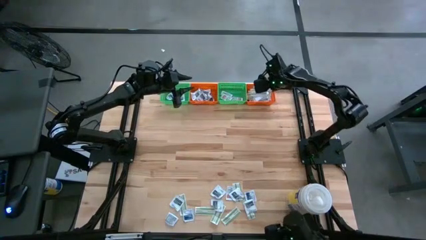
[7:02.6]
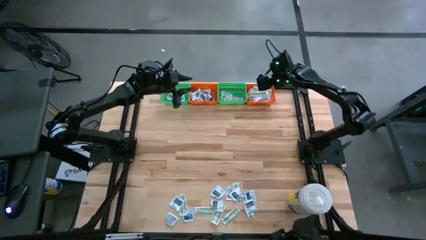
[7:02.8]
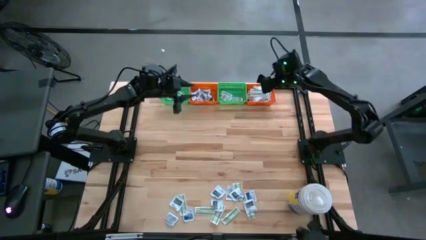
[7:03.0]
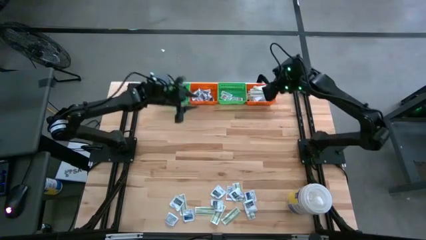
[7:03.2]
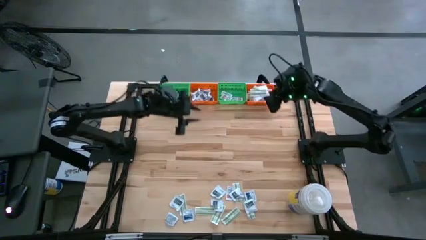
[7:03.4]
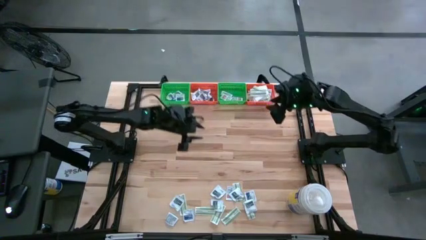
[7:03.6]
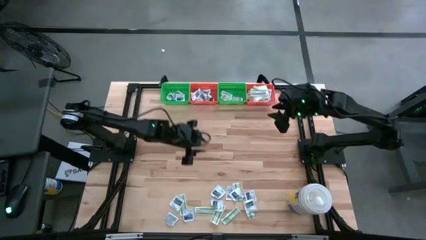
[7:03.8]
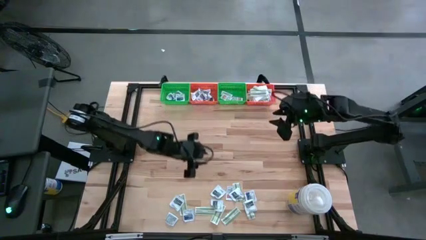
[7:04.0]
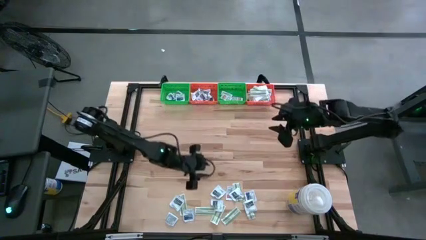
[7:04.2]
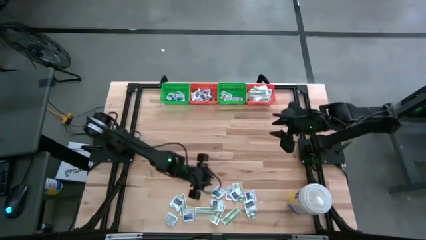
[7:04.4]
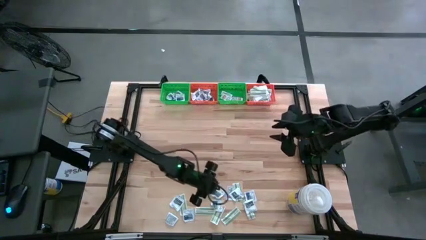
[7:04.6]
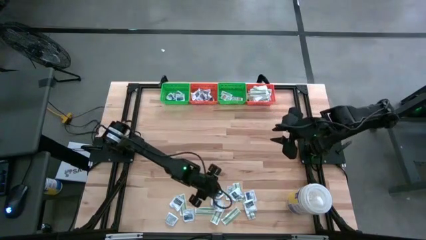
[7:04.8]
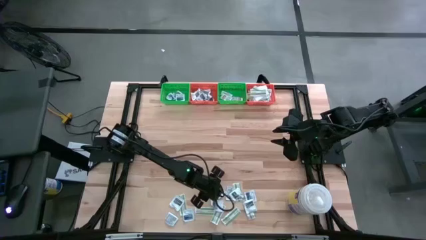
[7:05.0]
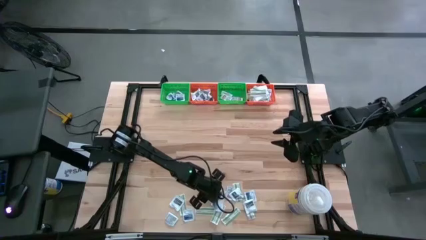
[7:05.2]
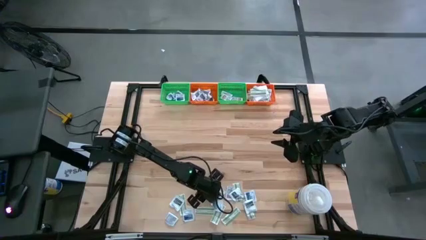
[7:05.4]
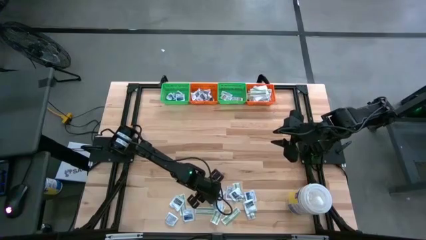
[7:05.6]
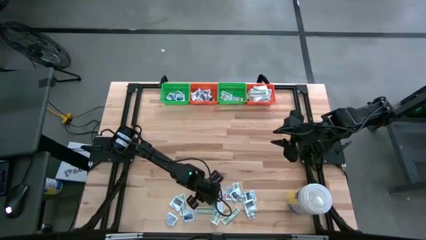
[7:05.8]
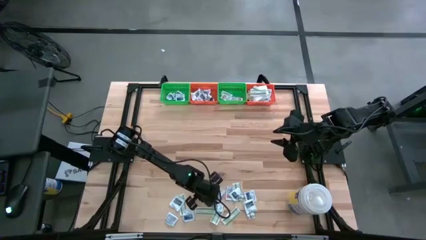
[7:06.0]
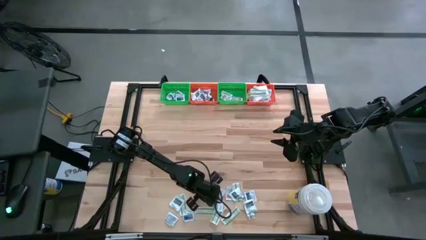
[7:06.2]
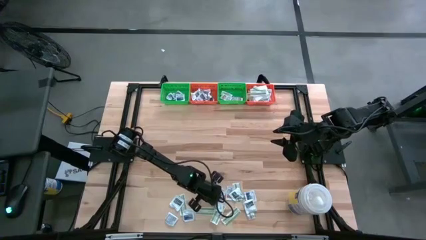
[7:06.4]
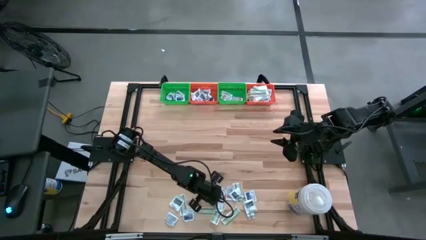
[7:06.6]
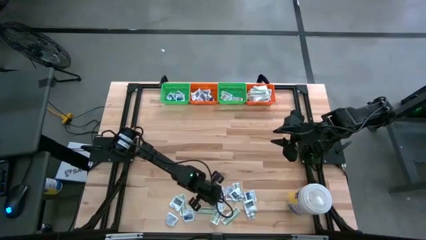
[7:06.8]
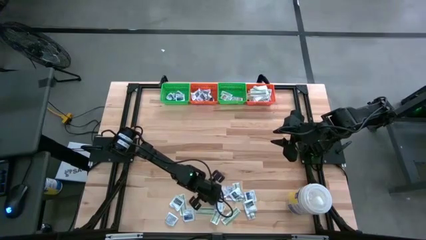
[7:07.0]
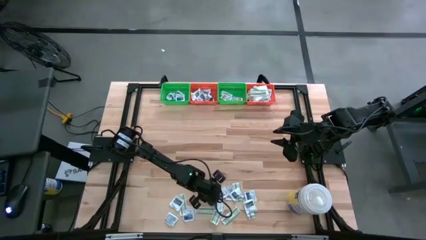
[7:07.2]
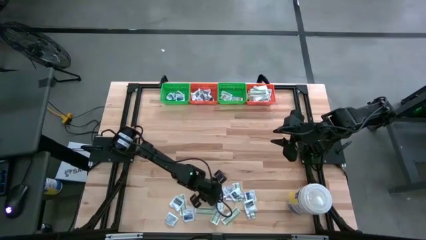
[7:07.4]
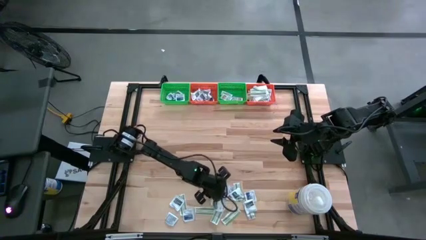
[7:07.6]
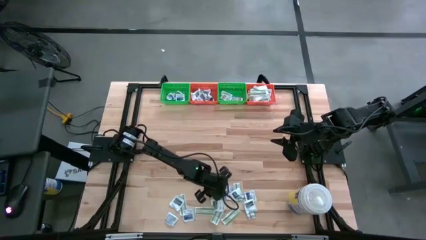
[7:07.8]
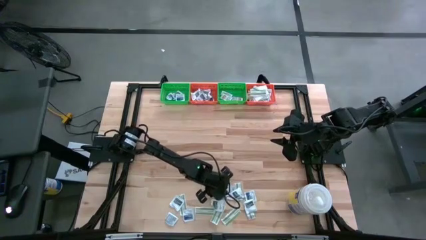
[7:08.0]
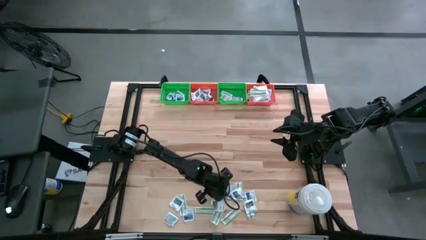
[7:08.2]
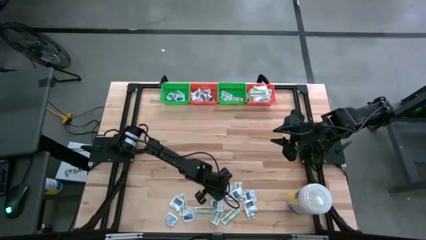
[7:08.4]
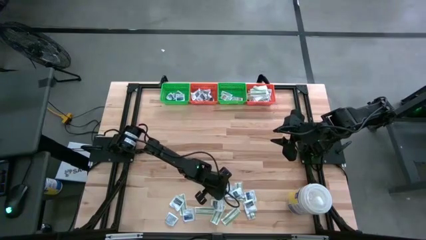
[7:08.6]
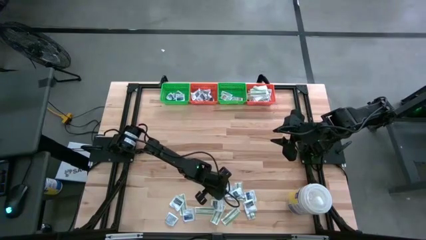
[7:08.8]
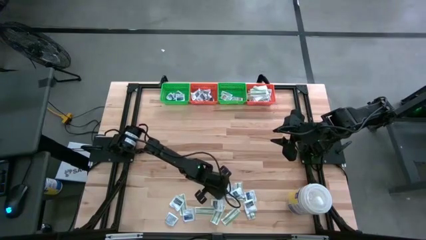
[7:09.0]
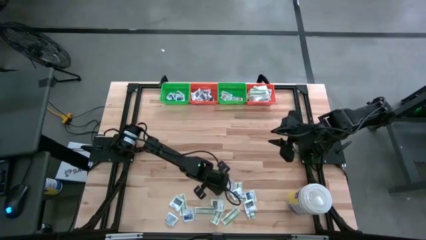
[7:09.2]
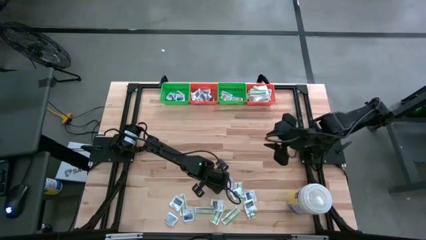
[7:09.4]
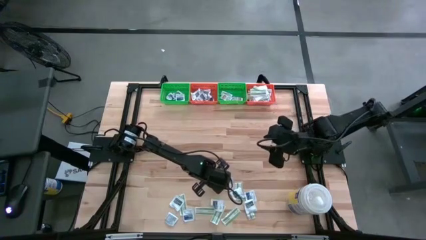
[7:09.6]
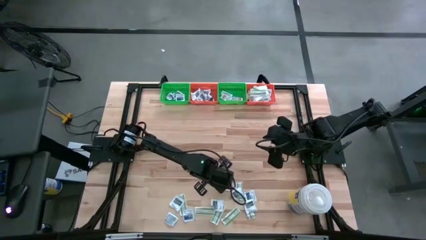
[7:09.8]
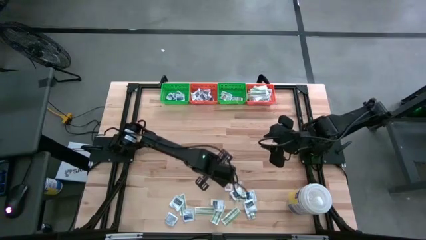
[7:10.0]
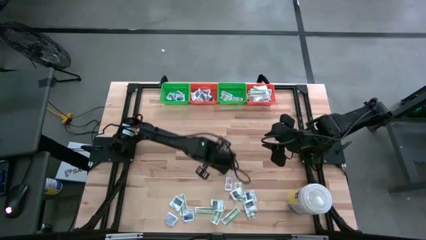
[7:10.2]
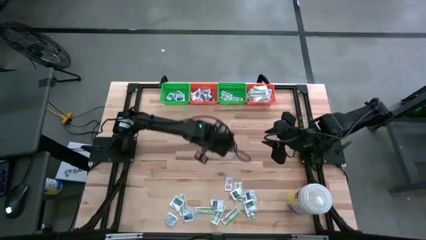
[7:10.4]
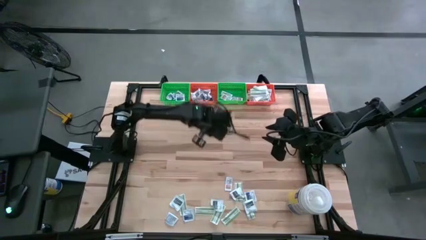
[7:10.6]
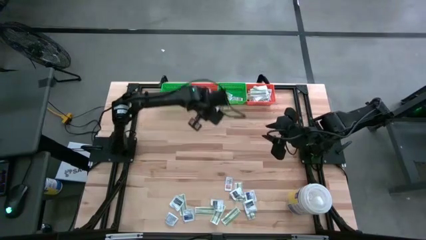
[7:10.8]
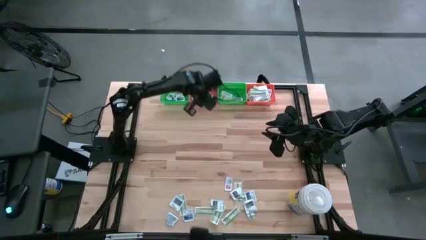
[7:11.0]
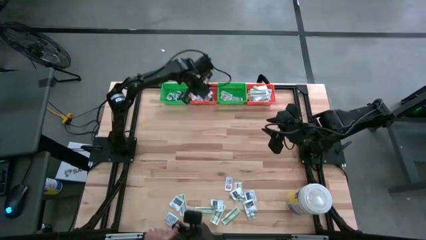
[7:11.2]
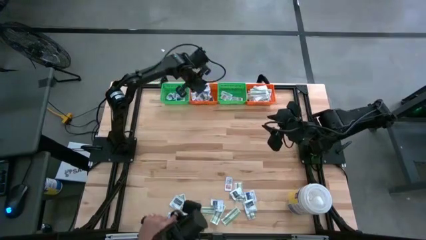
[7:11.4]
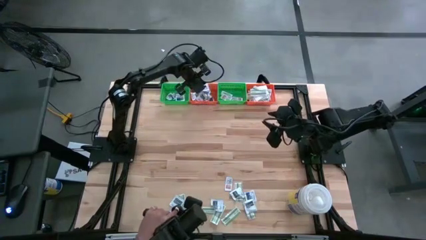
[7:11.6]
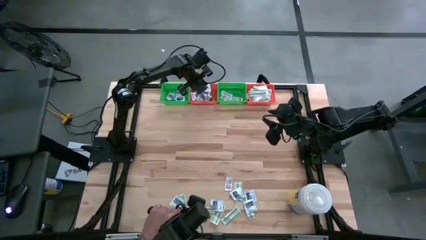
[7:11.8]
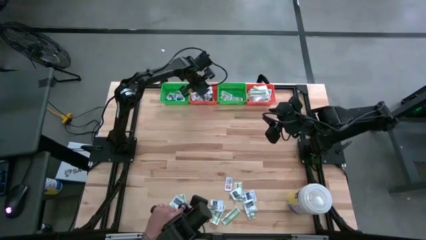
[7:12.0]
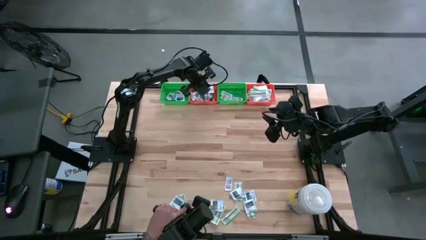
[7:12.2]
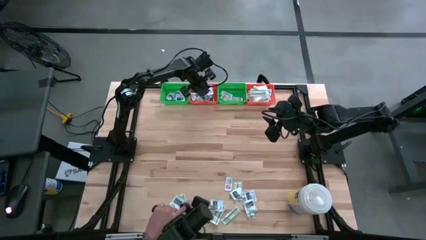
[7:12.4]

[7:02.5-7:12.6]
Task: Pick & Place First Aid Supplies
Put the gray towelette pack in the left orange bin

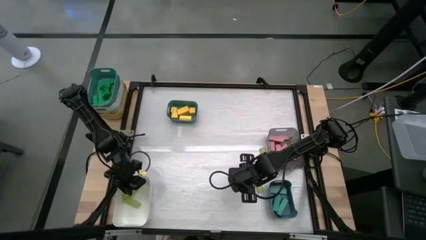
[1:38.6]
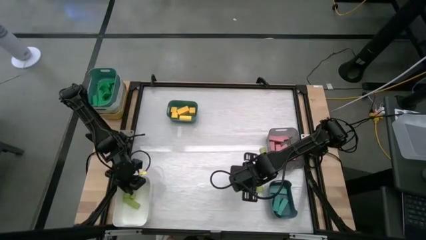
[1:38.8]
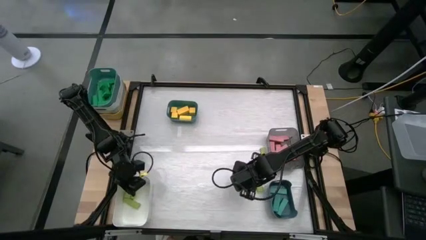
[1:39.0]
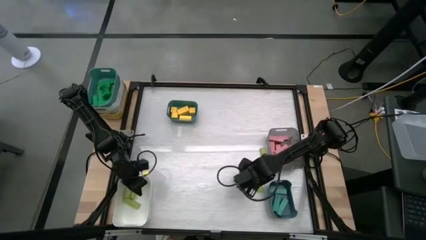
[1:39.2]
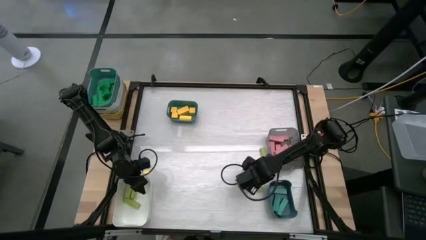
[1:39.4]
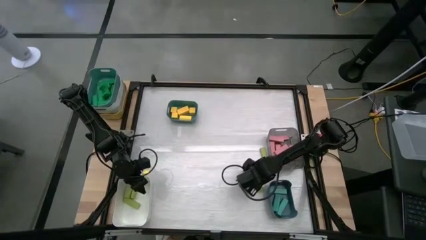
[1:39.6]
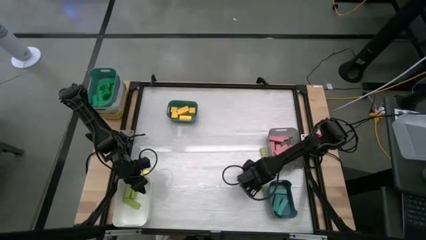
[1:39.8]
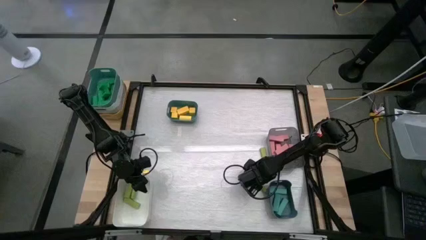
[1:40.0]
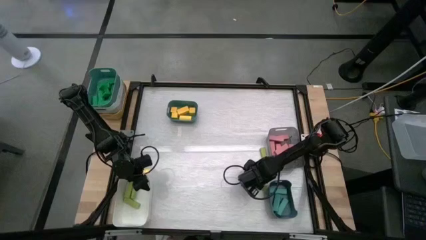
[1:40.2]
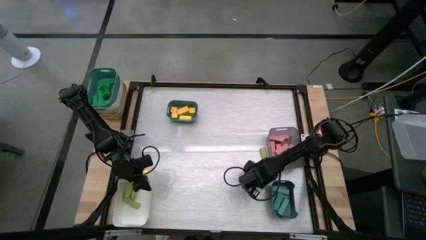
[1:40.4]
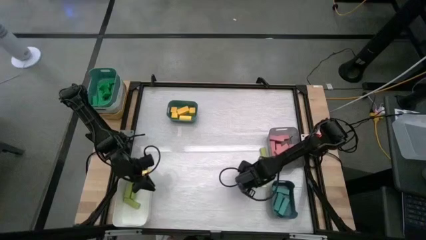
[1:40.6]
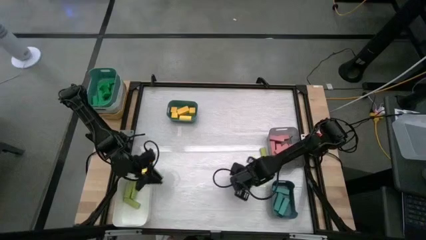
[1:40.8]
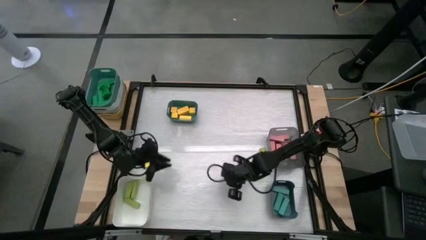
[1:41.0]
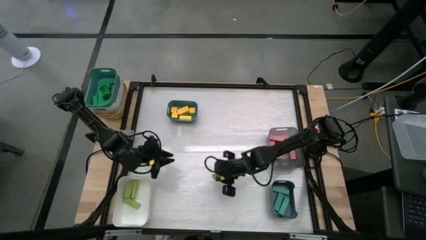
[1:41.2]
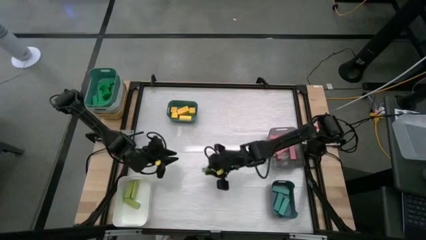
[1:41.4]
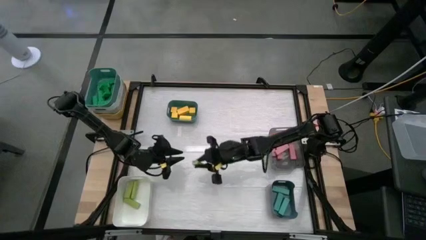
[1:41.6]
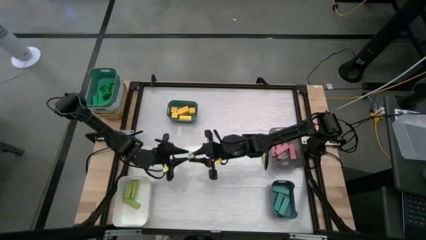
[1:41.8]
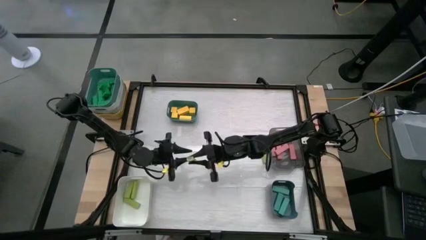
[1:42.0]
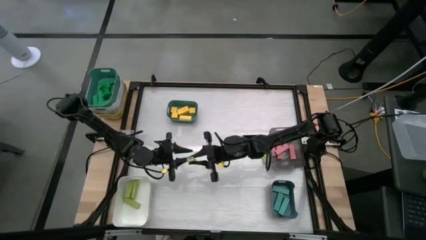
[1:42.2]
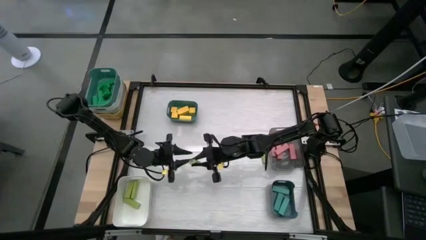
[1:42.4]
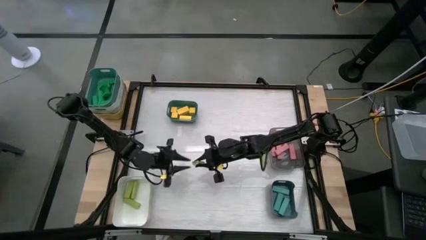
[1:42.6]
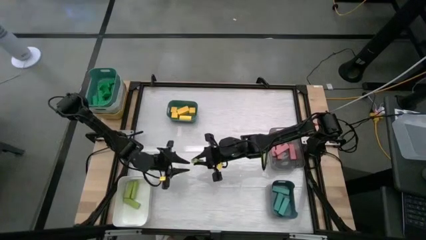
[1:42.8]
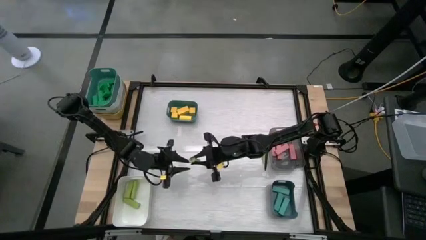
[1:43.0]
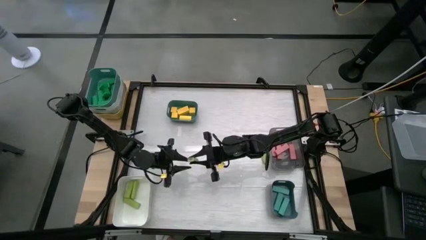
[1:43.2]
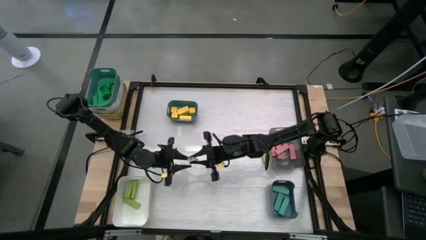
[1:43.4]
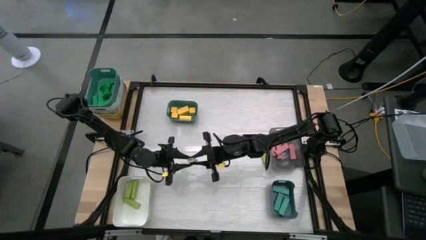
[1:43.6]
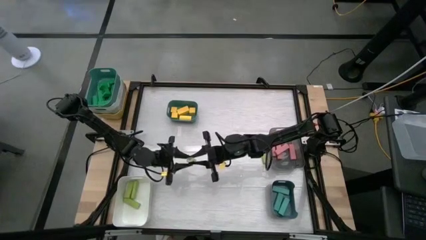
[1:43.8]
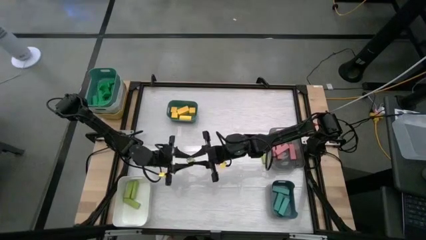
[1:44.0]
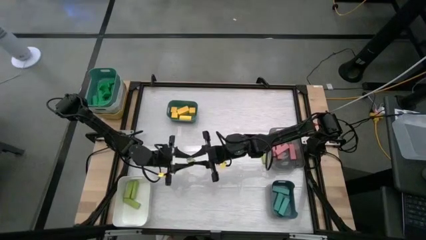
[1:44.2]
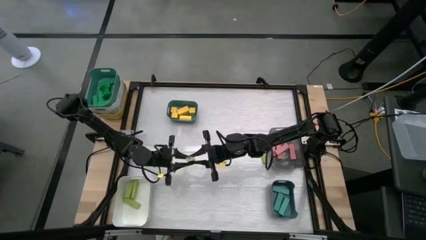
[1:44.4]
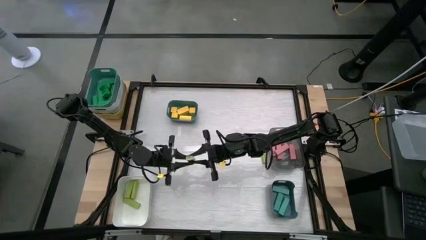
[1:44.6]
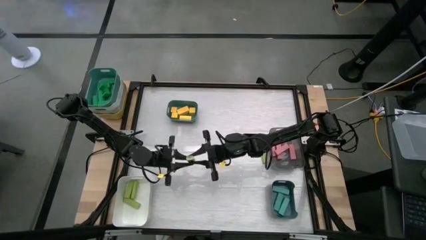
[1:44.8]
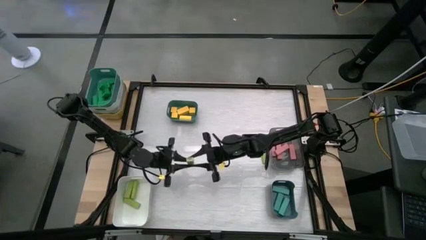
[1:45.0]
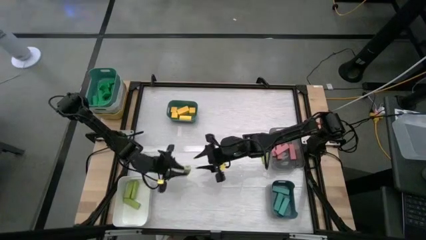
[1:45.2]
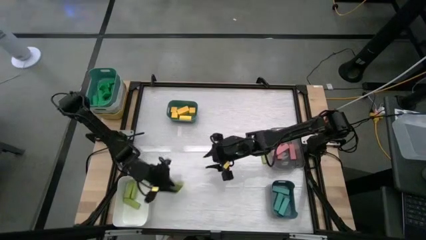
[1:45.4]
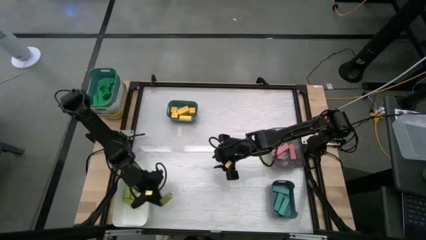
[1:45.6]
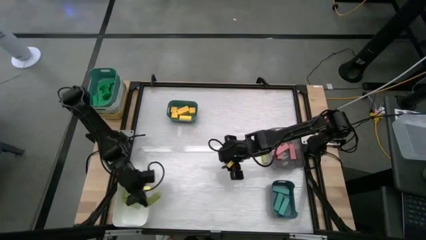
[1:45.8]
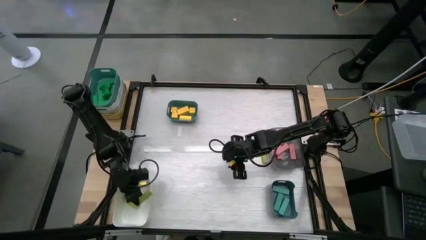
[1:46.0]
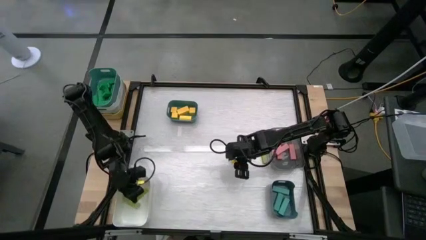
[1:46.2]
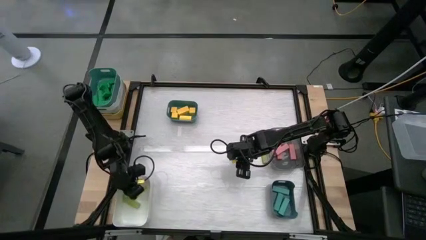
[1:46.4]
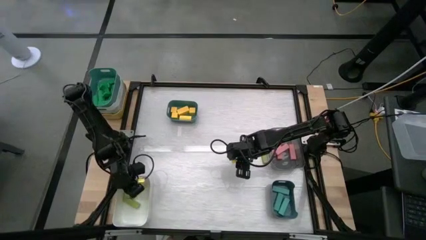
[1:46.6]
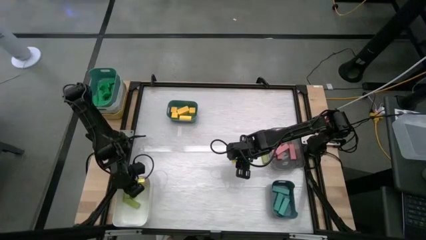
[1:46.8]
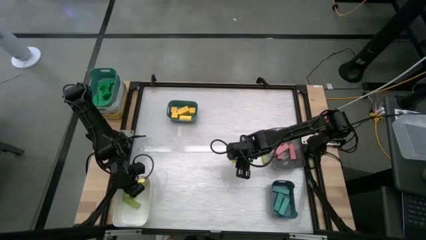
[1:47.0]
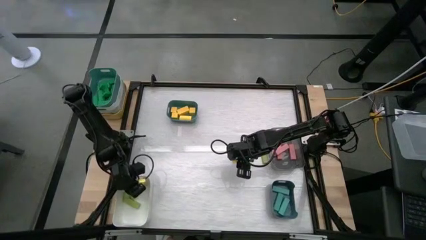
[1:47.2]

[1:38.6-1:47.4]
Task: Sort blocks
Put the green block into the white bin
